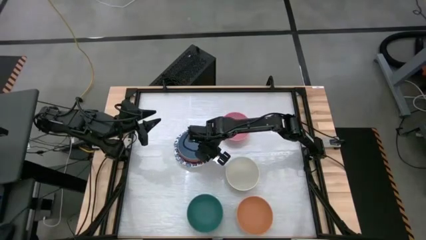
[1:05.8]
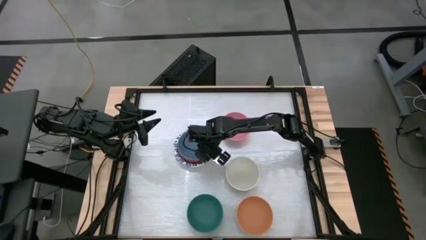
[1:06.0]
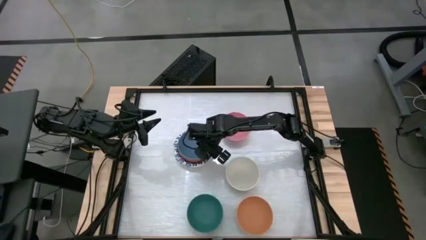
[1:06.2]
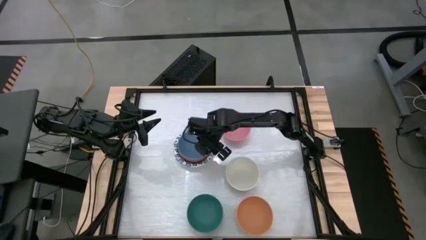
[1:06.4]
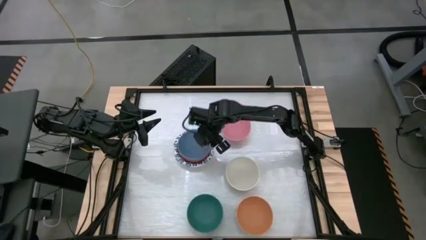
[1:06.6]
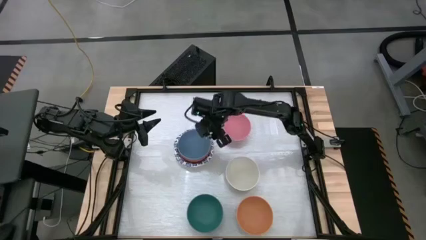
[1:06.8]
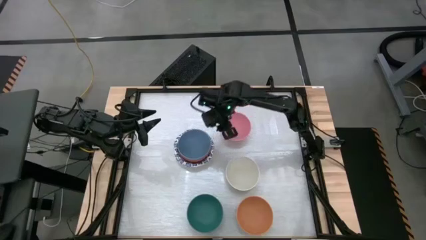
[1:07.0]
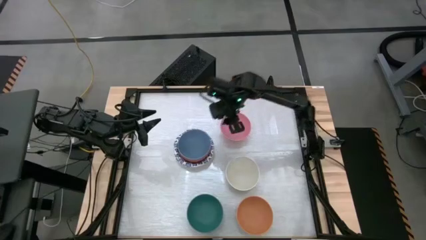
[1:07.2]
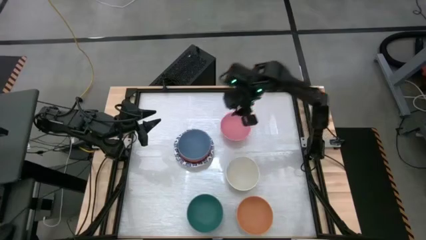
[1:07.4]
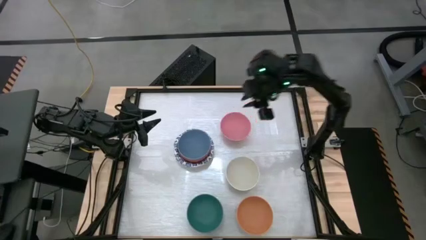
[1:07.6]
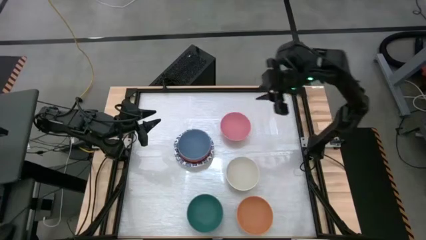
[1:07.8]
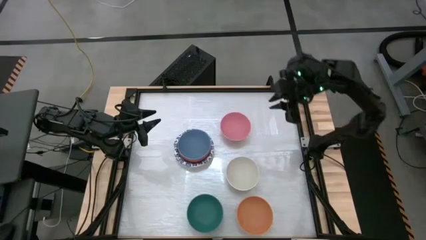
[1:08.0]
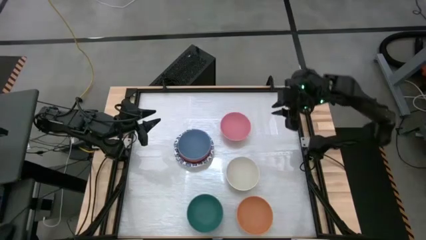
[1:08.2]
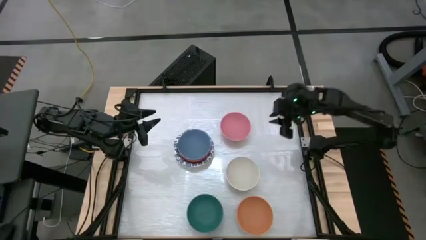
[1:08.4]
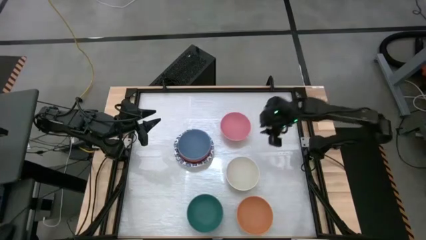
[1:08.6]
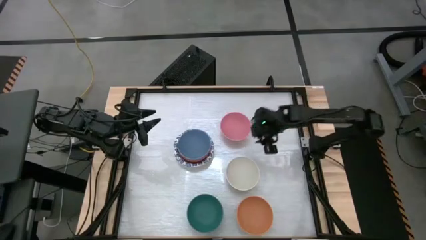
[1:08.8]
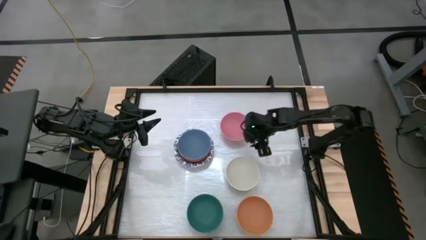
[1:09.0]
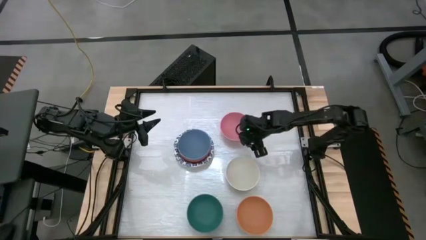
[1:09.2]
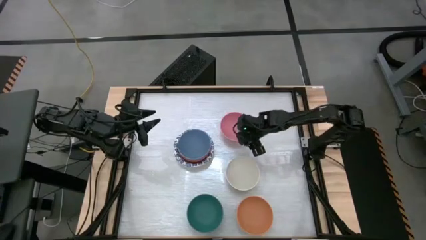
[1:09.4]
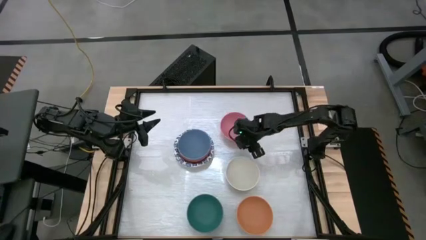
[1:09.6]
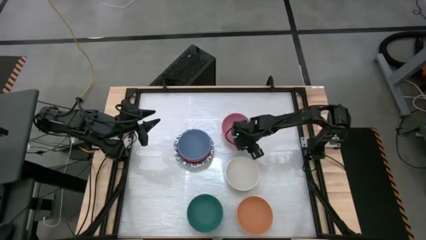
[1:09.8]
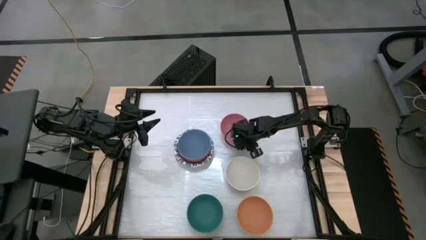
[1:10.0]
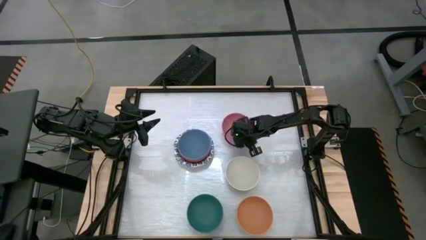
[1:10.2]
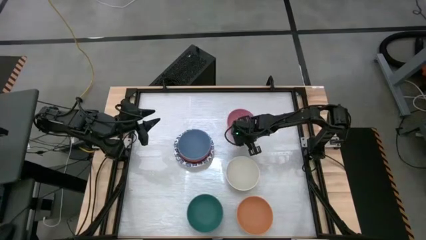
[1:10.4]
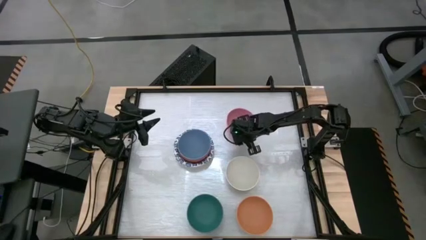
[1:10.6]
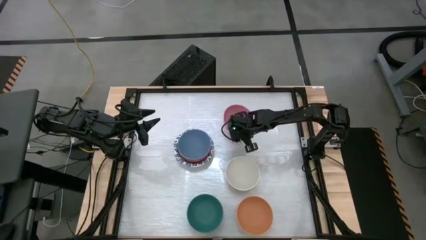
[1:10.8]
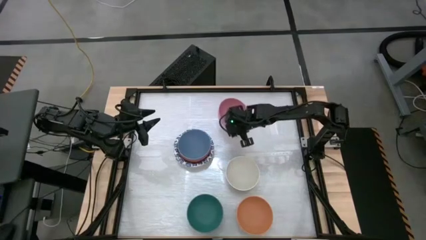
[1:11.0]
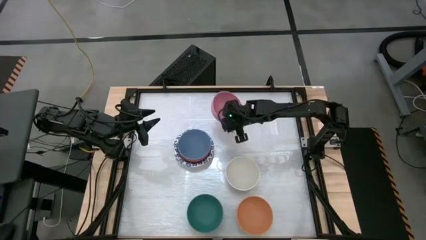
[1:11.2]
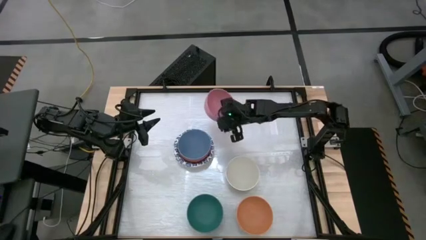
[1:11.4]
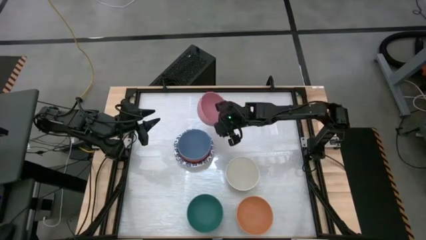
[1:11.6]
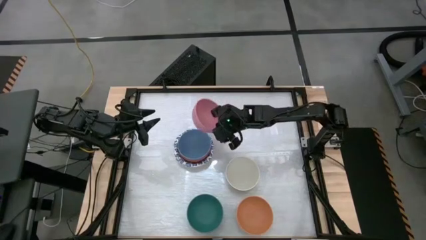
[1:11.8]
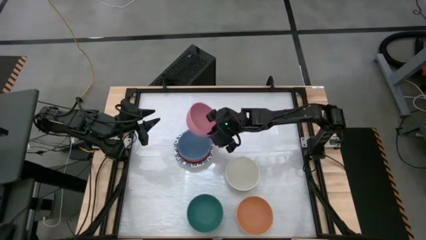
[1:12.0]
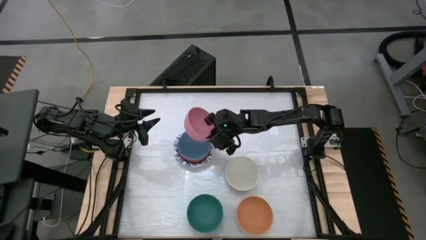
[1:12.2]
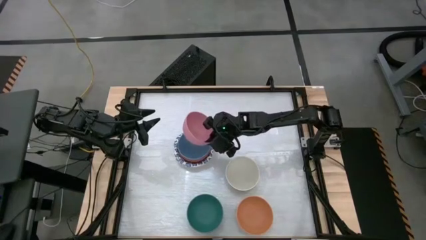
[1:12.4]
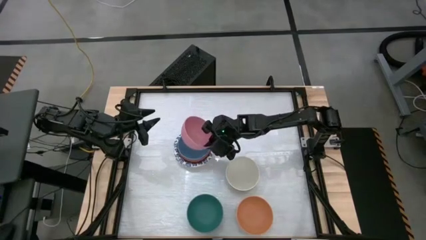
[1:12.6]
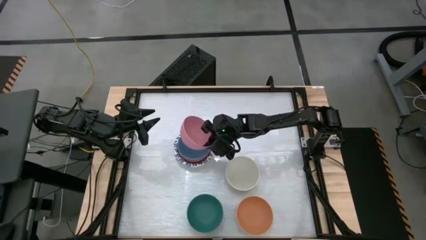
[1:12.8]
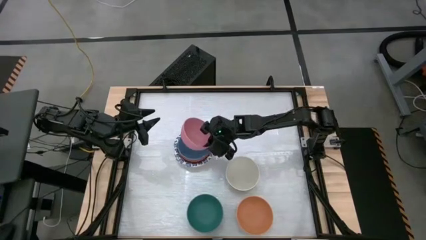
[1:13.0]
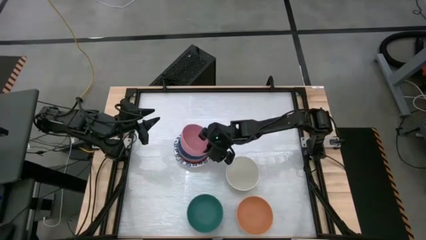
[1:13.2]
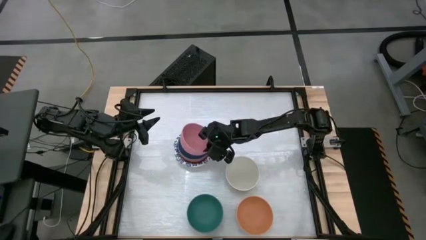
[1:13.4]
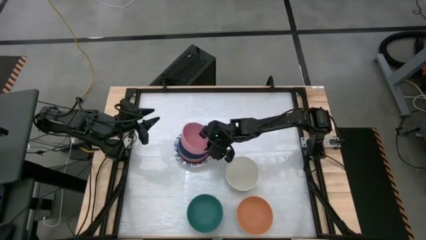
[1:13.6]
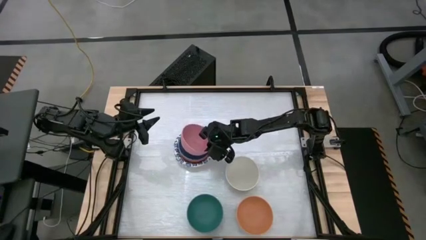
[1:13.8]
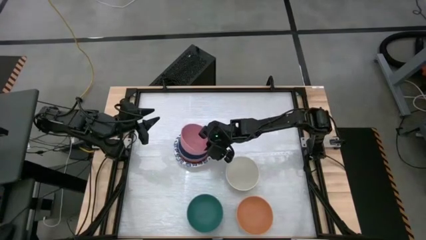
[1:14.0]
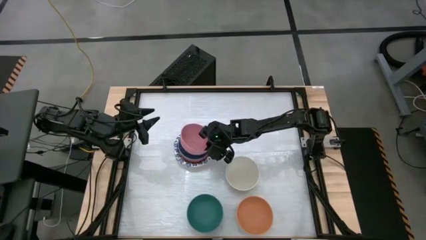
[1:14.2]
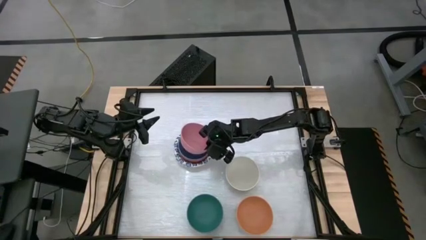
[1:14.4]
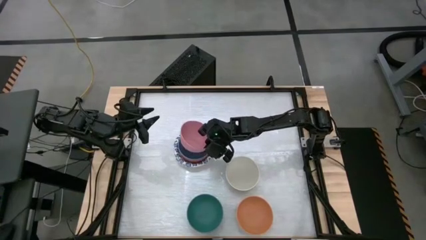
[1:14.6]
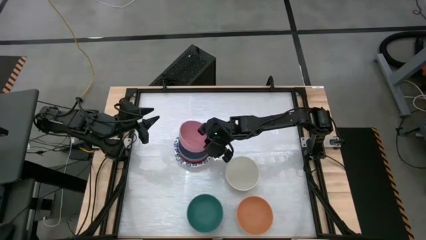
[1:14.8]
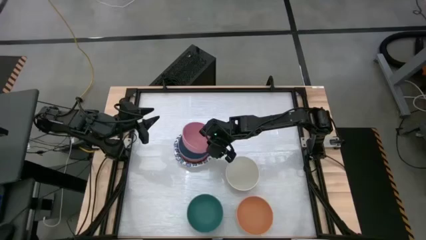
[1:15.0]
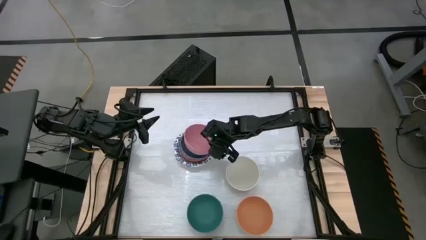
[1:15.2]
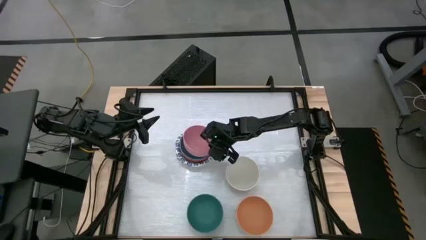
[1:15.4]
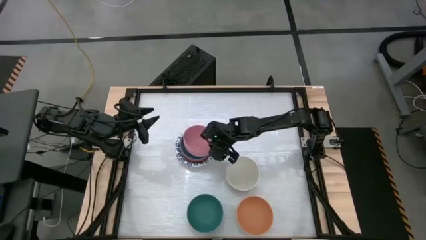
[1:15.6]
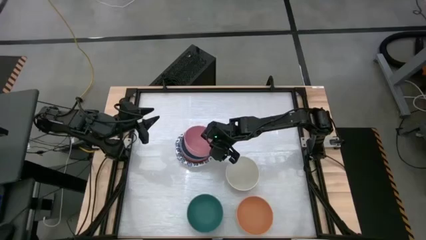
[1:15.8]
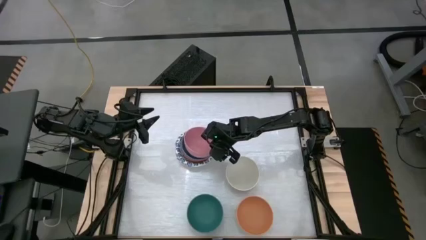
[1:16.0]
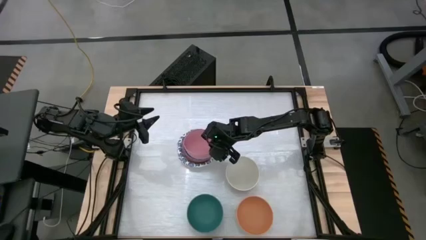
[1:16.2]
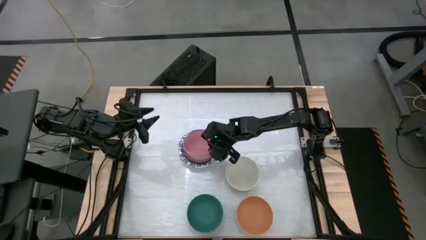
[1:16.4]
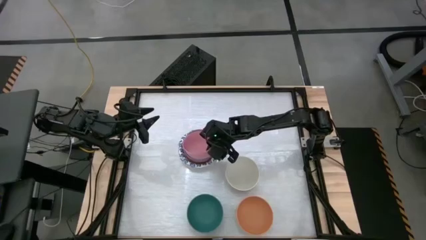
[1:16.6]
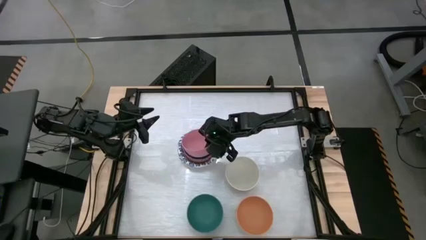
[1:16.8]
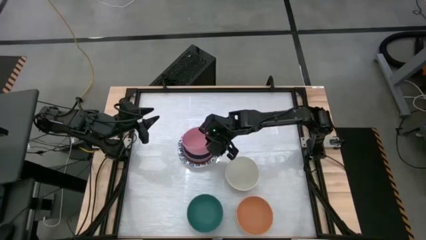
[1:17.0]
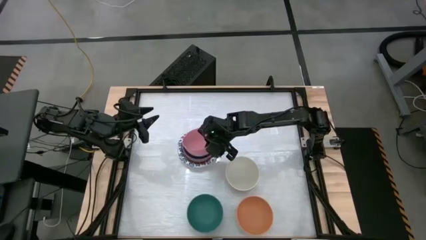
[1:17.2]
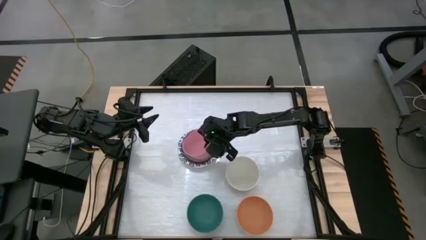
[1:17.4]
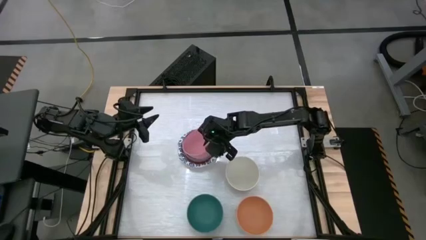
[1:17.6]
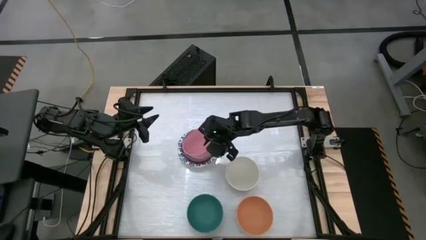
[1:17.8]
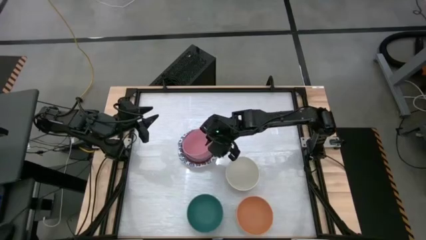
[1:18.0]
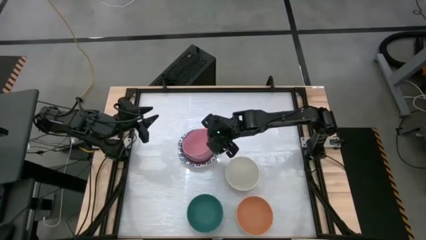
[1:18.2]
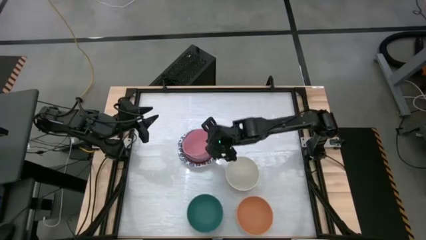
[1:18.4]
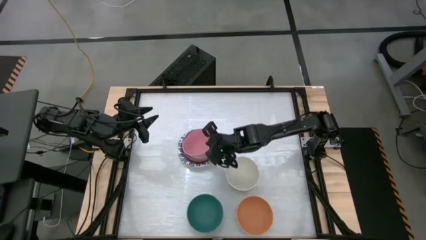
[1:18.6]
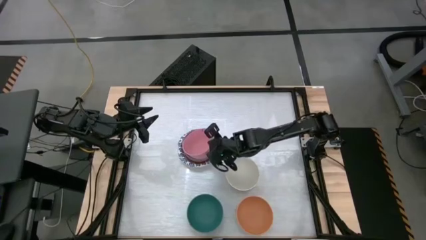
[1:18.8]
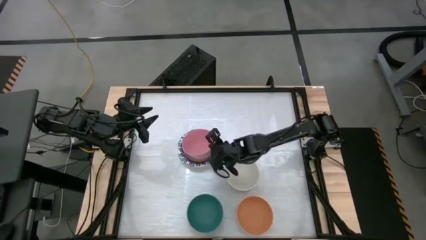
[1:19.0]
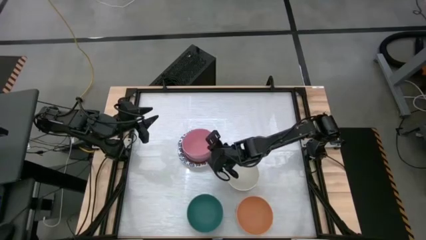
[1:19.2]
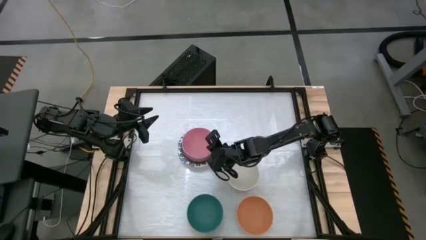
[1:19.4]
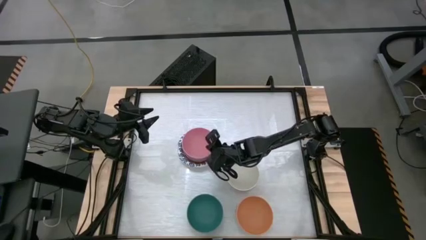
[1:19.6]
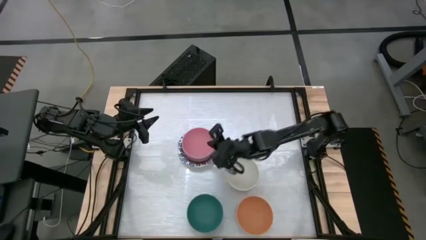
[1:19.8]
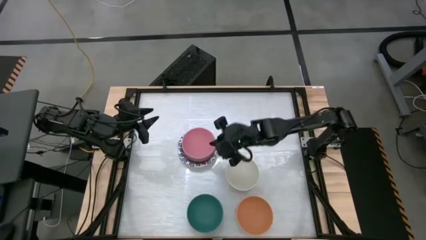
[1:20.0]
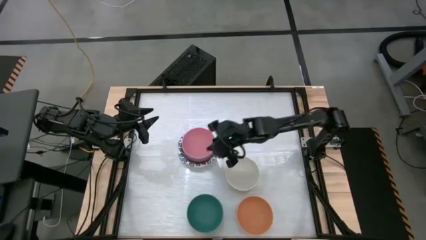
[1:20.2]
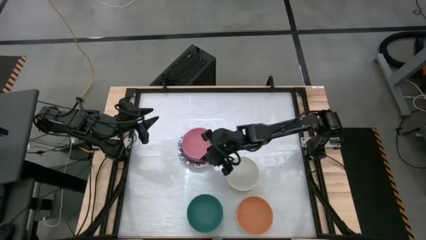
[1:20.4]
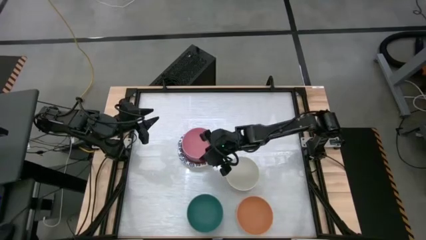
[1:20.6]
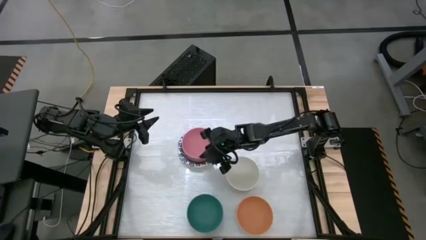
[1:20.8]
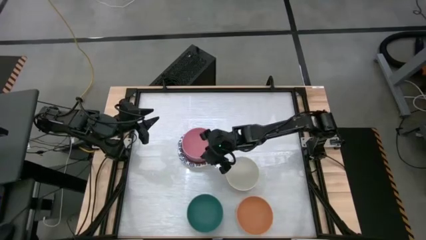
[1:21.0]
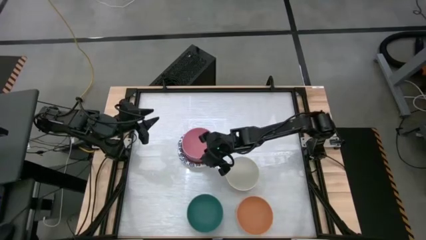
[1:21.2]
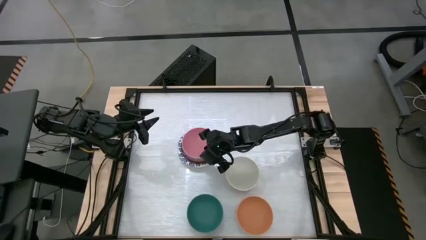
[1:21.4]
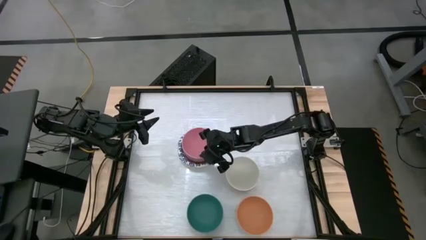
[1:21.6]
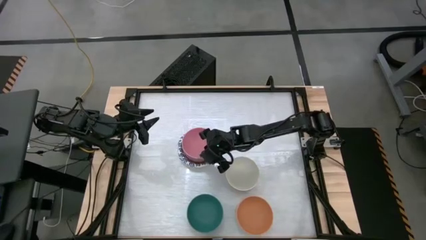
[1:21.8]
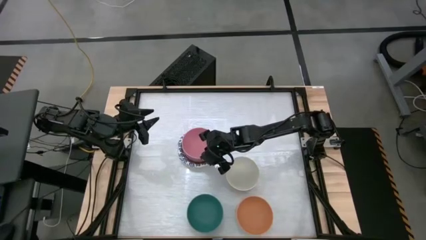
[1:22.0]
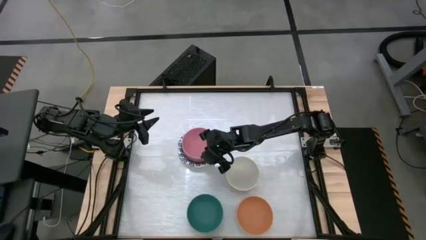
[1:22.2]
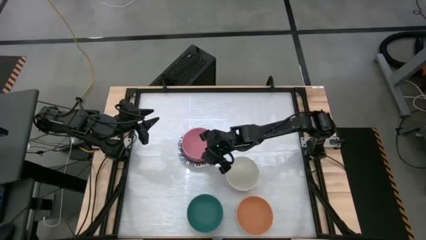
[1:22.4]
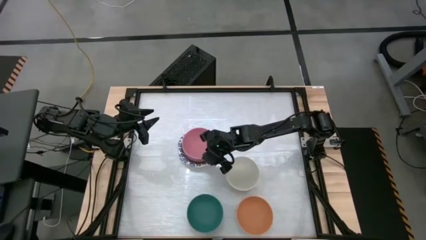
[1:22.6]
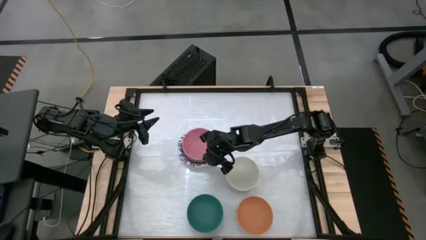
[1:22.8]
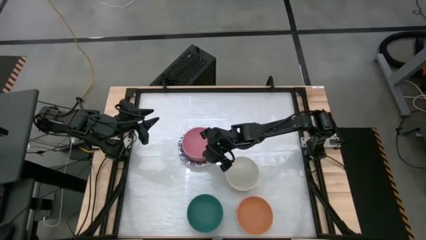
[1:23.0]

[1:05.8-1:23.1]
Stack the pink bowl on top of the blue bowl
